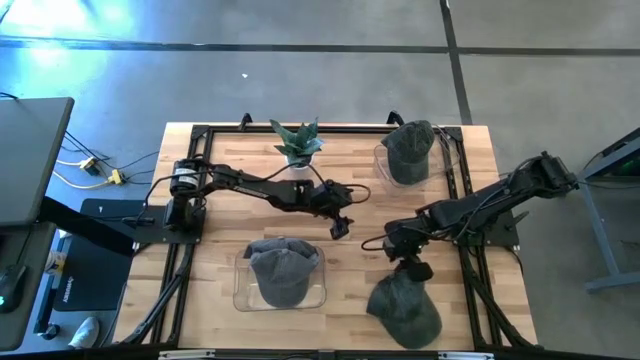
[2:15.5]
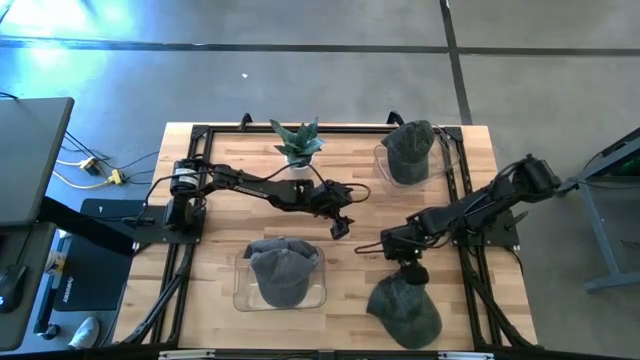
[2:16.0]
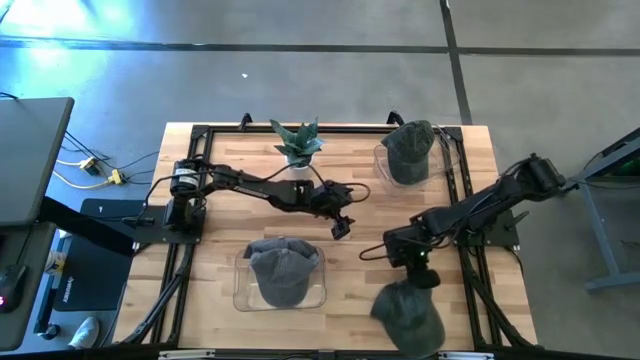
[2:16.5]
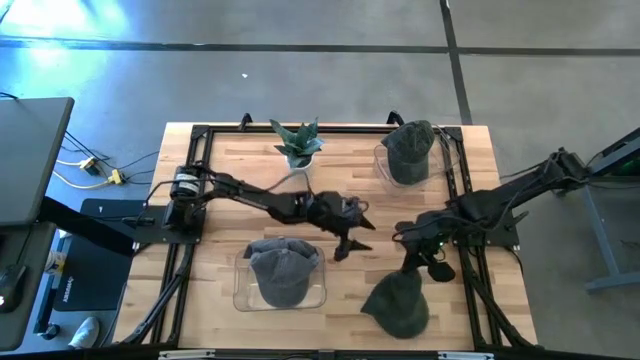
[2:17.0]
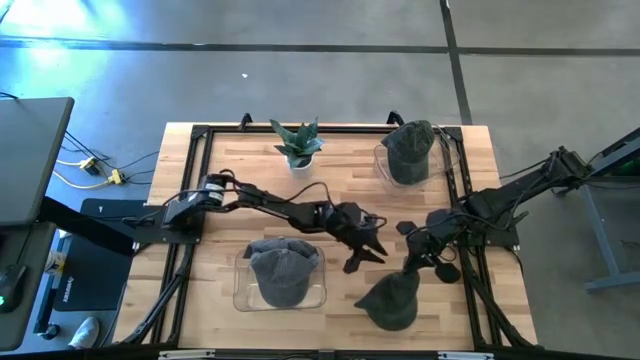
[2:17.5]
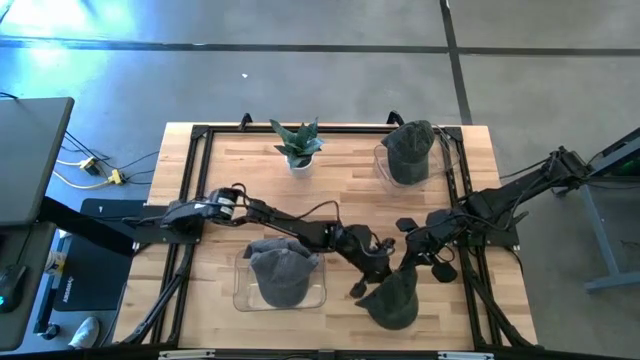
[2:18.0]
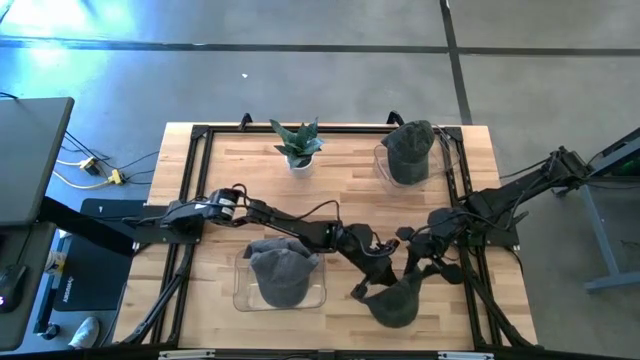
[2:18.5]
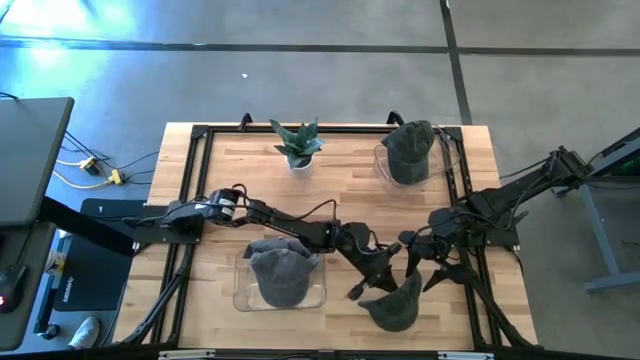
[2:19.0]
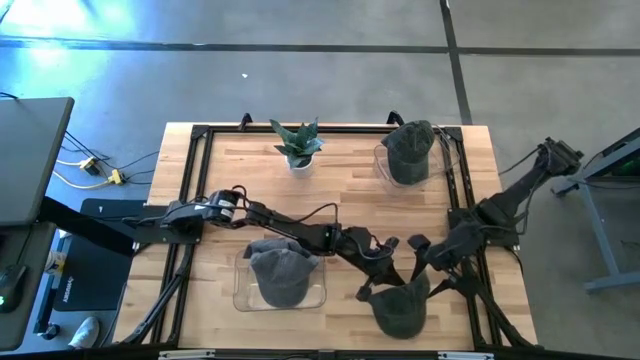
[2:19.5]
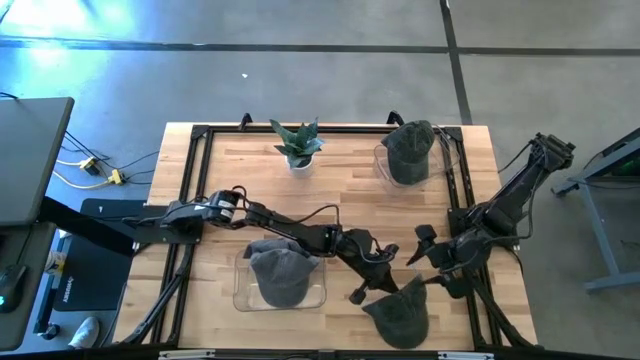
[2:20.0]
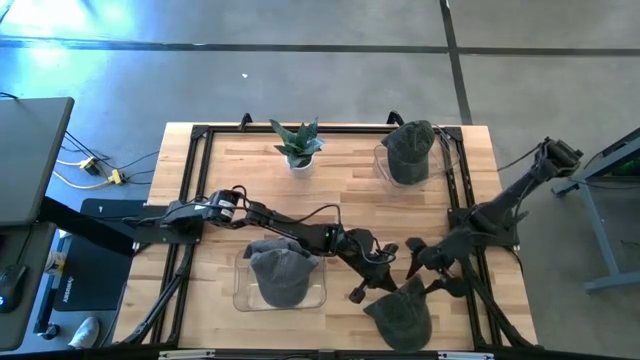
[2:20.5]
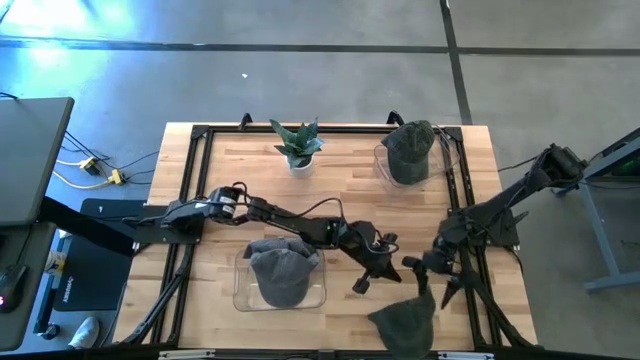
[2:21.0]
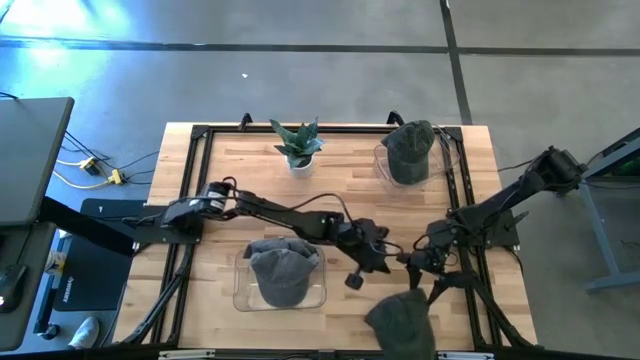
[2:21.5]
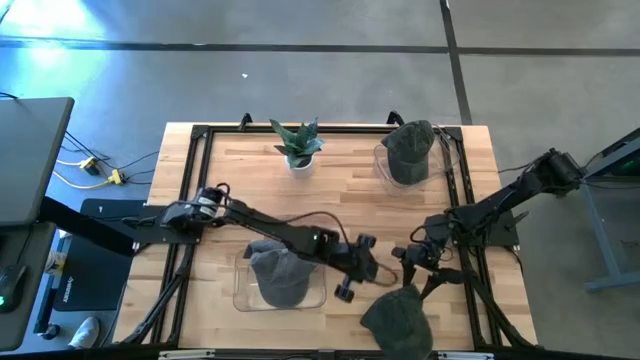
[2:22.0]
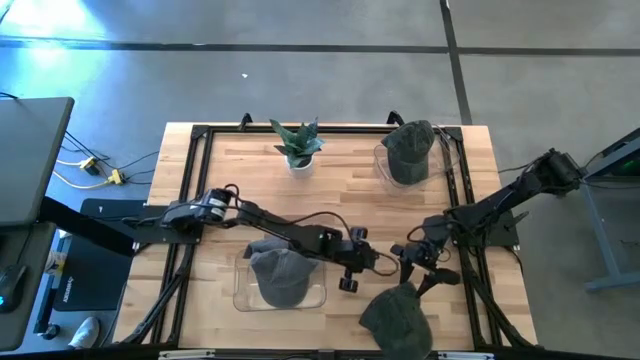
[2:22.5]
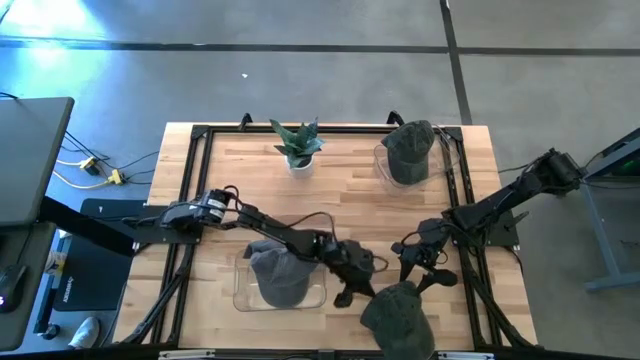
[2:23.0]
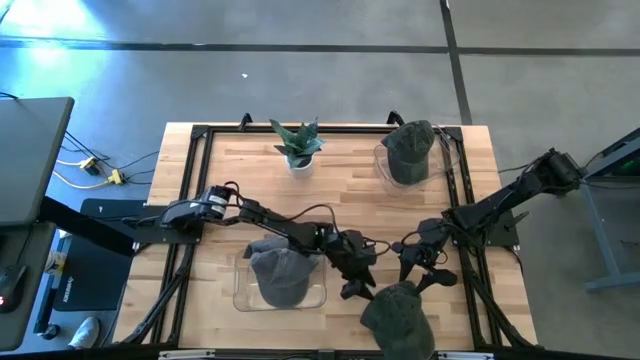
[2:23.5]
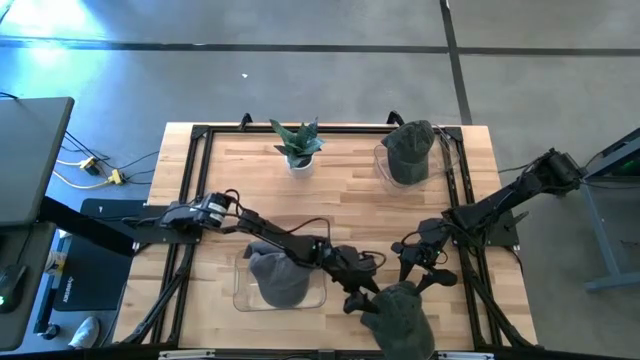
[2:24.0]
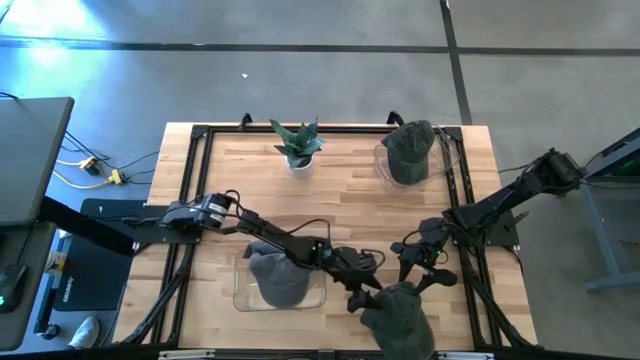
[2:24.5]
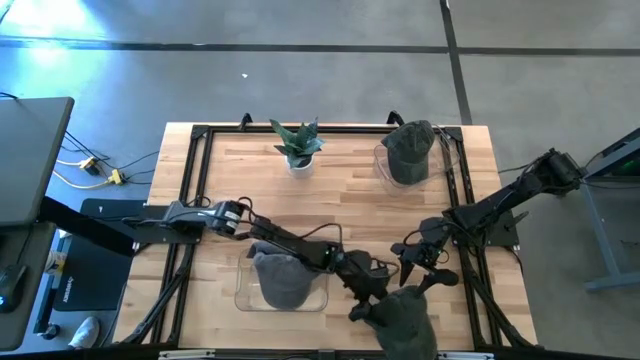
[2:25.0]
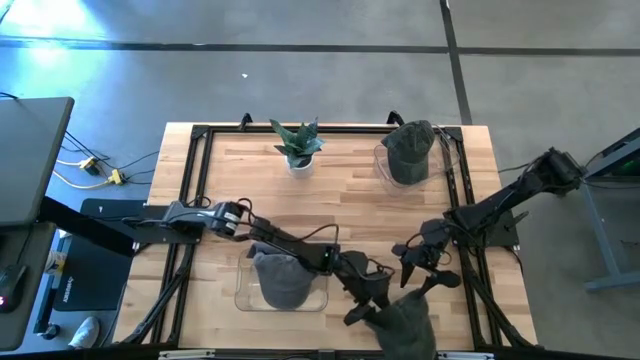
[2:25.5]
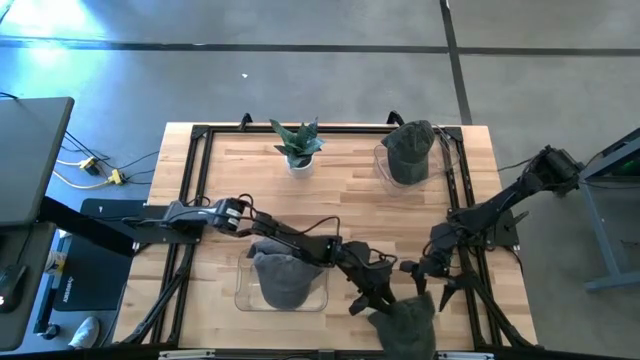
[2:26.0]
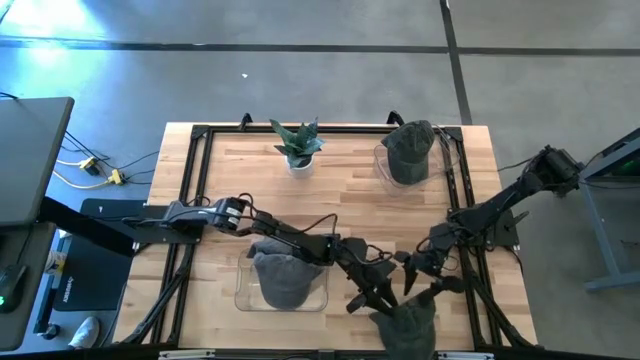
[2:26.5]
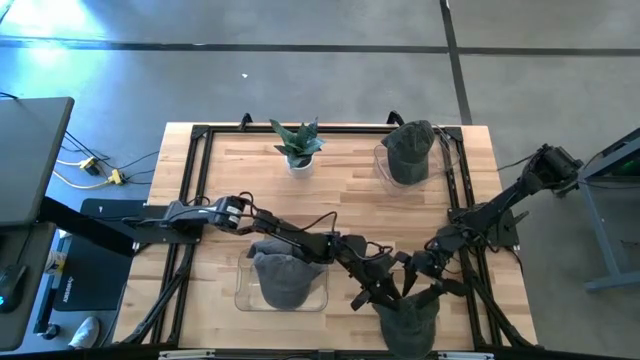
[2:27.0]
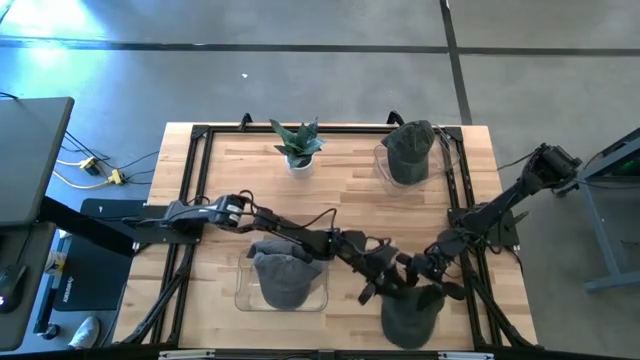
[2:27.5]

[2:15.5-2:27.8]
Task: Pick & Place hat
Put the dark green cap into the top transparent bin
